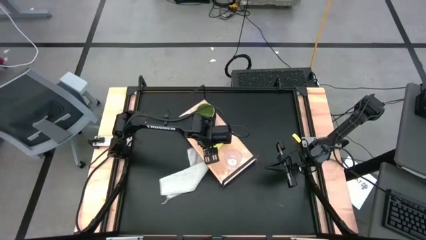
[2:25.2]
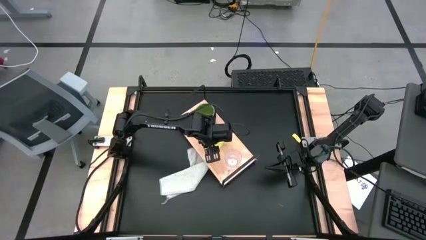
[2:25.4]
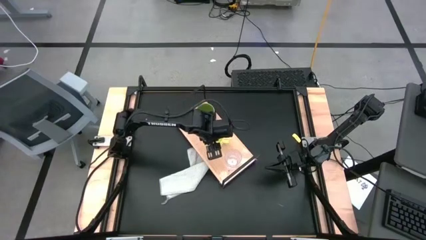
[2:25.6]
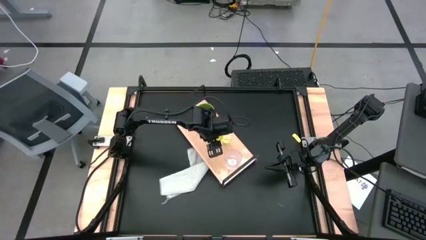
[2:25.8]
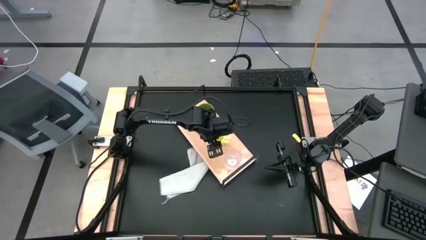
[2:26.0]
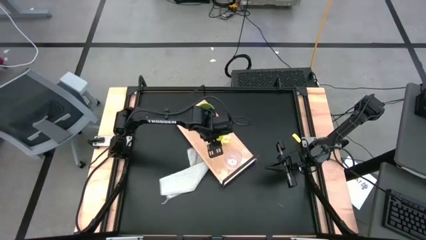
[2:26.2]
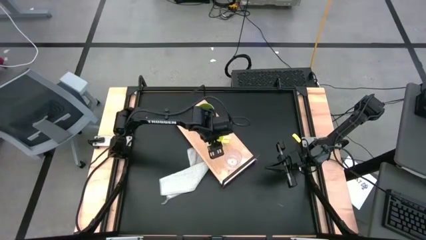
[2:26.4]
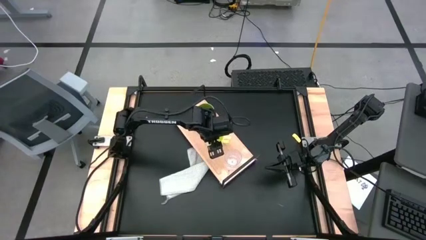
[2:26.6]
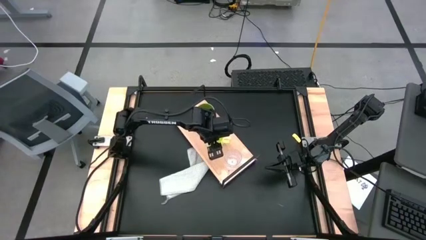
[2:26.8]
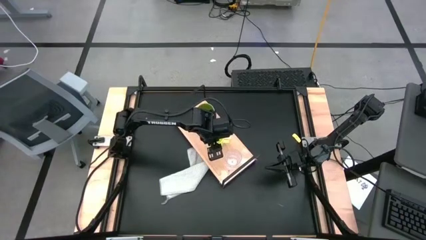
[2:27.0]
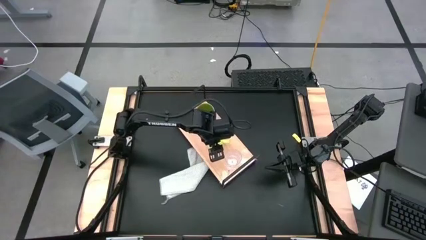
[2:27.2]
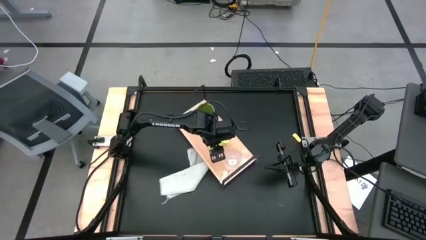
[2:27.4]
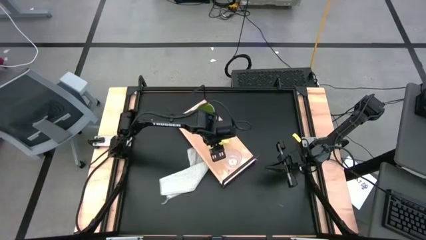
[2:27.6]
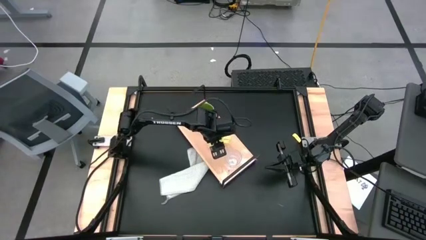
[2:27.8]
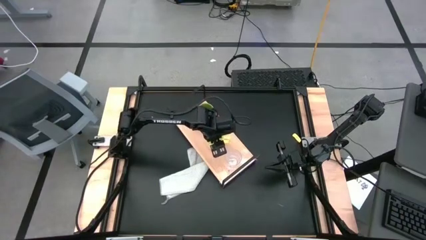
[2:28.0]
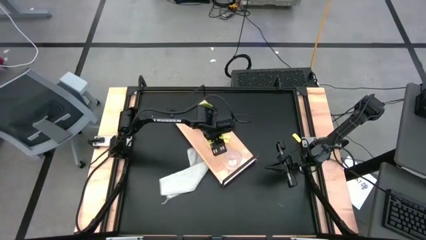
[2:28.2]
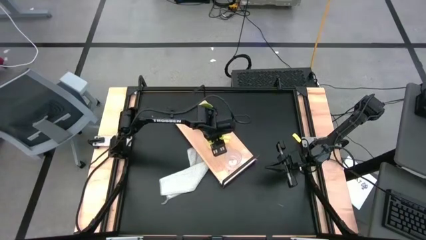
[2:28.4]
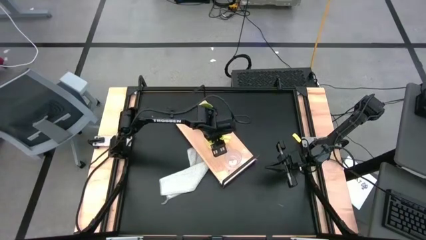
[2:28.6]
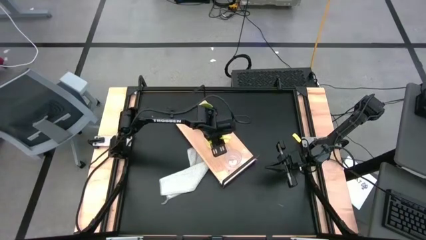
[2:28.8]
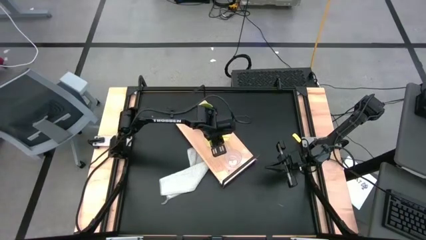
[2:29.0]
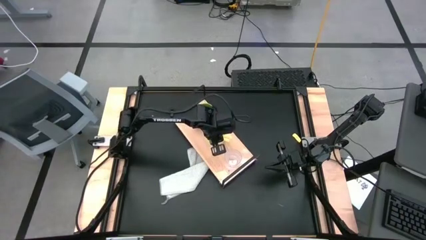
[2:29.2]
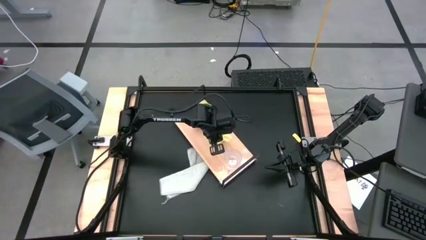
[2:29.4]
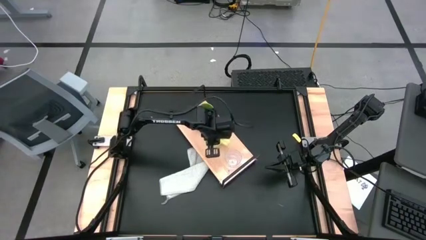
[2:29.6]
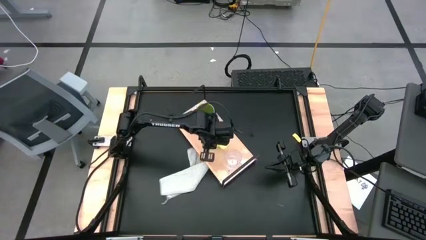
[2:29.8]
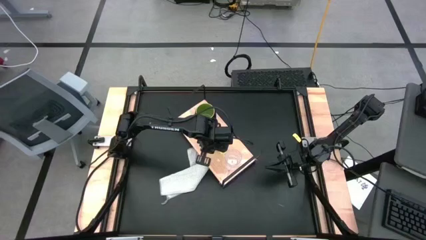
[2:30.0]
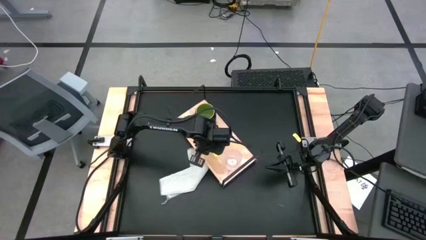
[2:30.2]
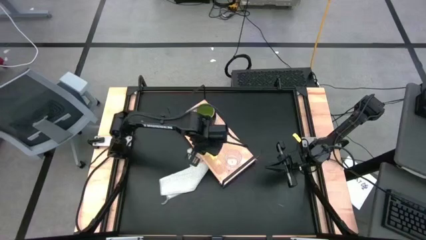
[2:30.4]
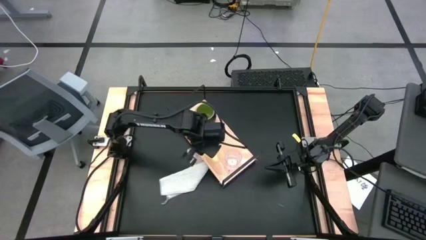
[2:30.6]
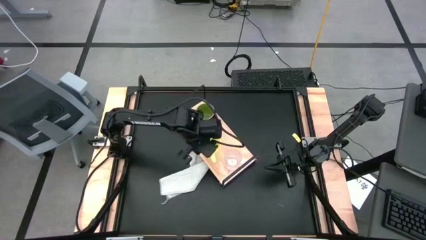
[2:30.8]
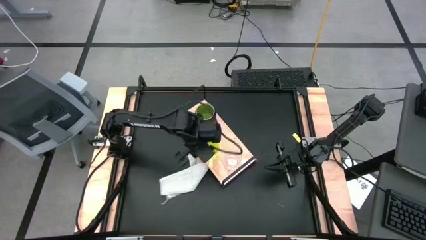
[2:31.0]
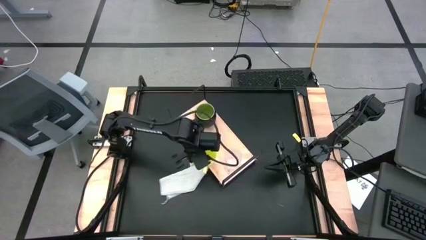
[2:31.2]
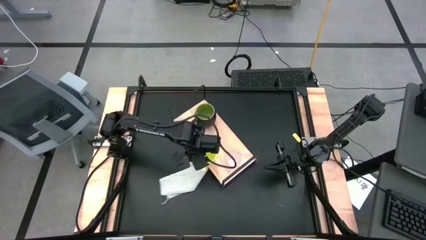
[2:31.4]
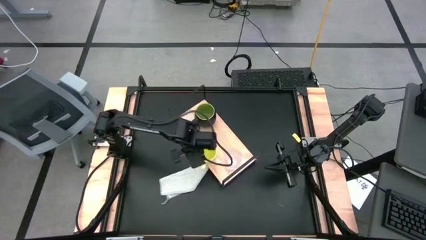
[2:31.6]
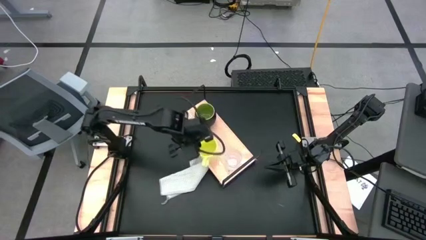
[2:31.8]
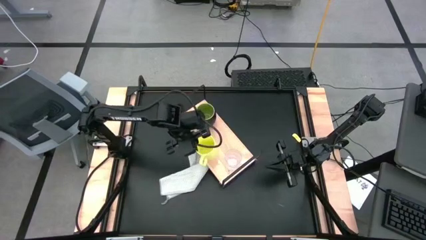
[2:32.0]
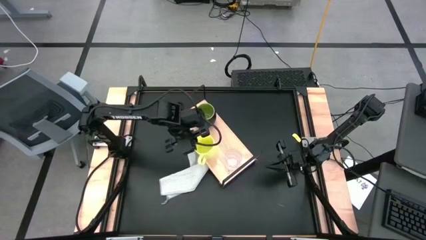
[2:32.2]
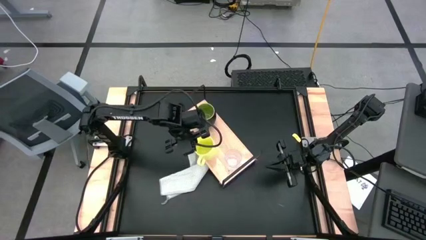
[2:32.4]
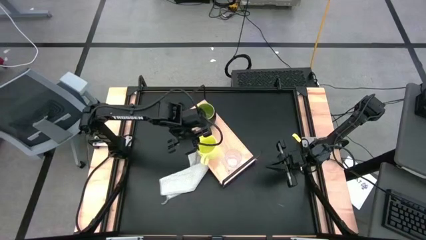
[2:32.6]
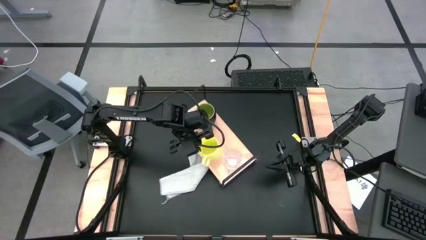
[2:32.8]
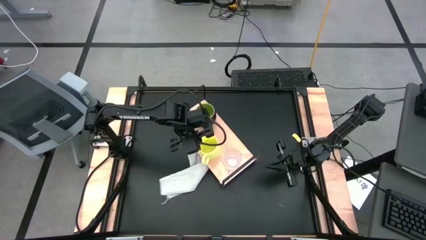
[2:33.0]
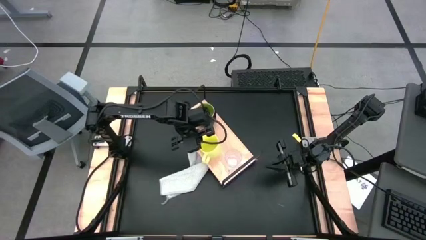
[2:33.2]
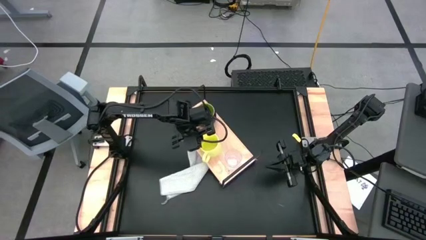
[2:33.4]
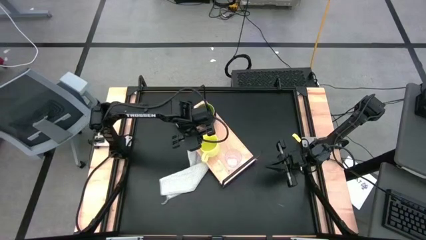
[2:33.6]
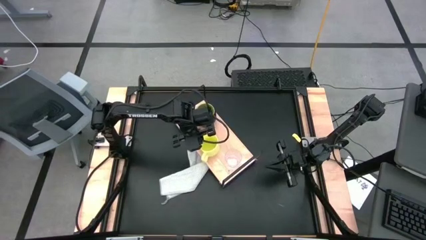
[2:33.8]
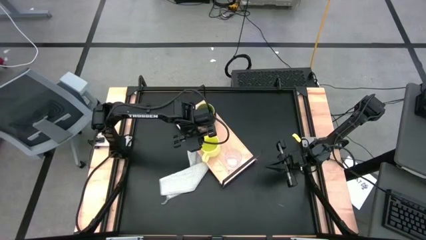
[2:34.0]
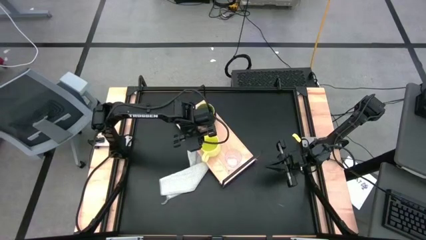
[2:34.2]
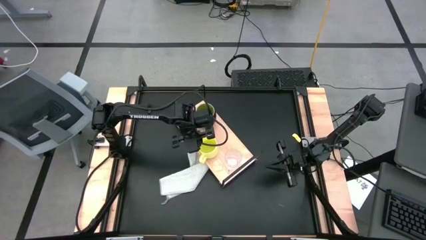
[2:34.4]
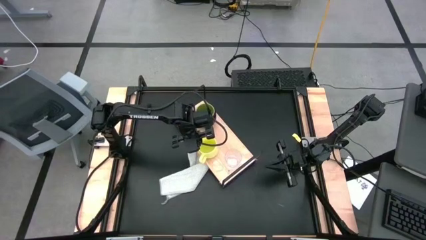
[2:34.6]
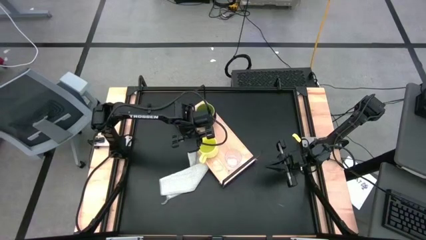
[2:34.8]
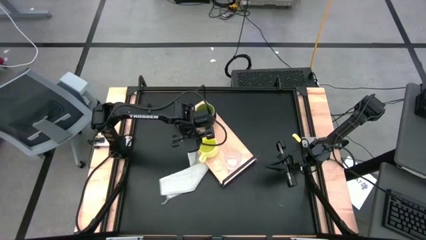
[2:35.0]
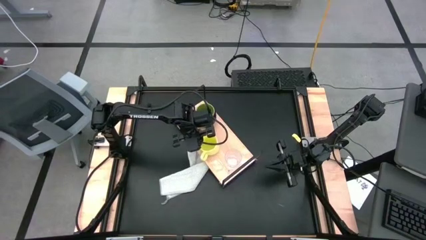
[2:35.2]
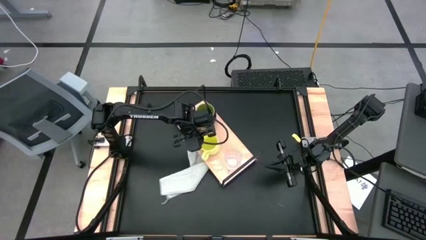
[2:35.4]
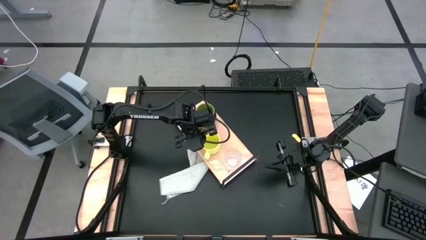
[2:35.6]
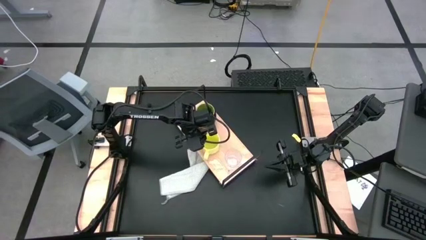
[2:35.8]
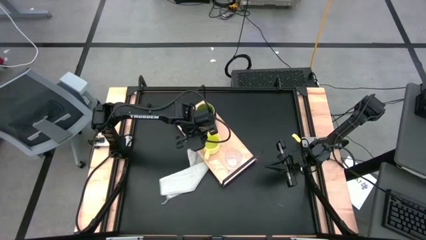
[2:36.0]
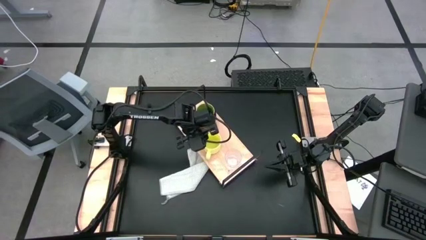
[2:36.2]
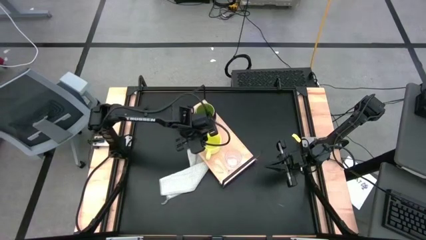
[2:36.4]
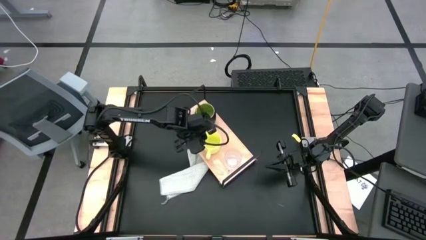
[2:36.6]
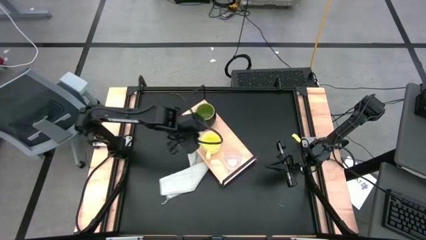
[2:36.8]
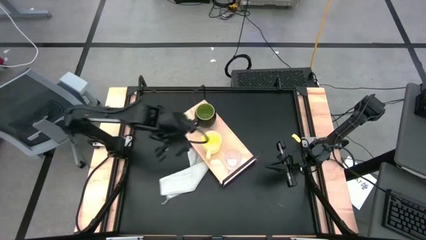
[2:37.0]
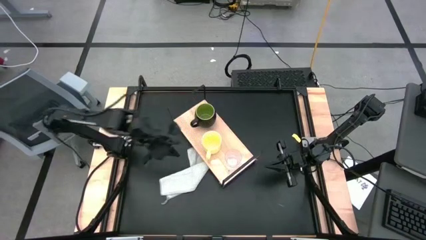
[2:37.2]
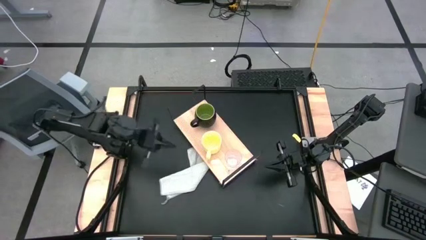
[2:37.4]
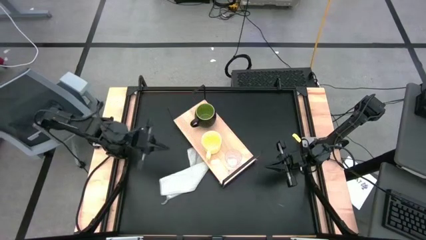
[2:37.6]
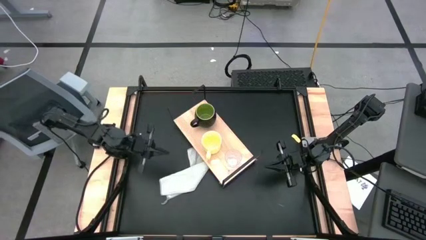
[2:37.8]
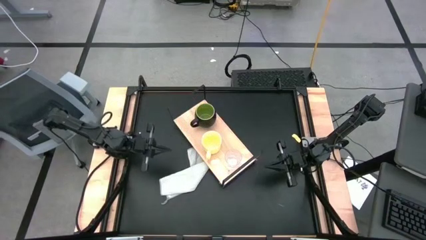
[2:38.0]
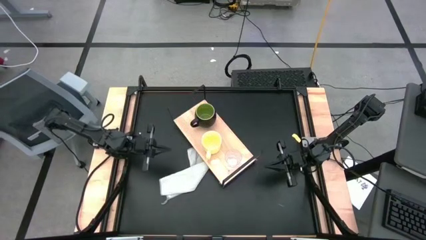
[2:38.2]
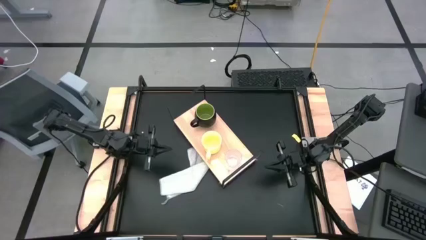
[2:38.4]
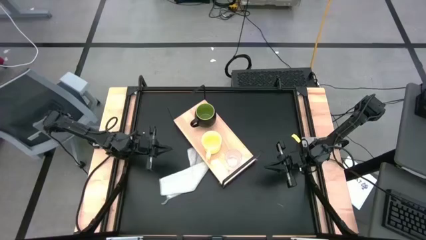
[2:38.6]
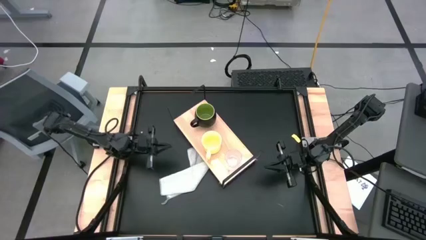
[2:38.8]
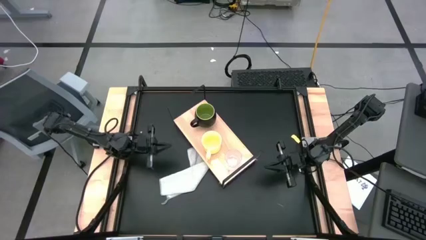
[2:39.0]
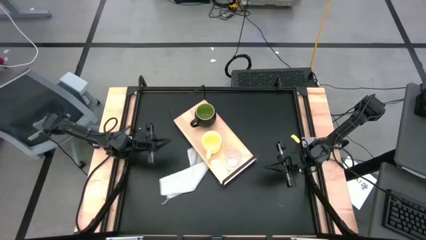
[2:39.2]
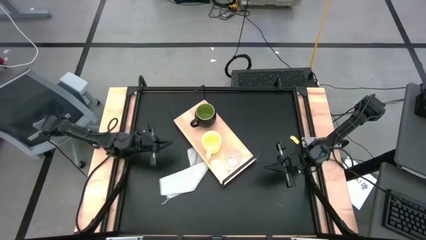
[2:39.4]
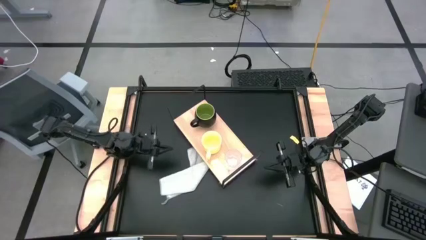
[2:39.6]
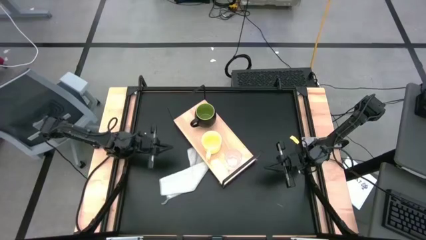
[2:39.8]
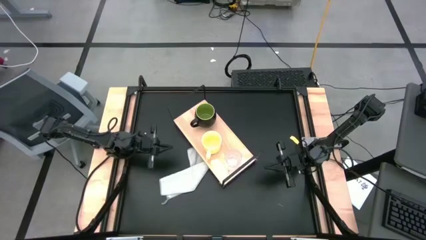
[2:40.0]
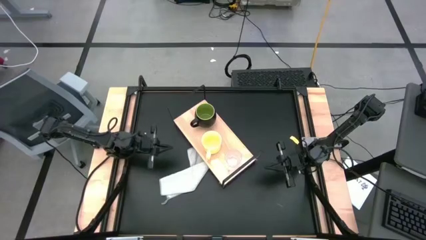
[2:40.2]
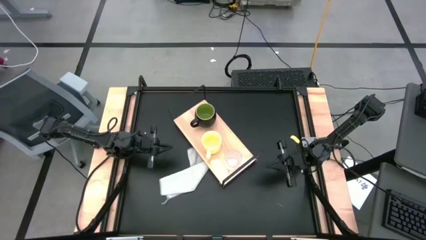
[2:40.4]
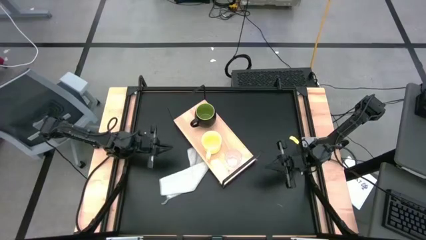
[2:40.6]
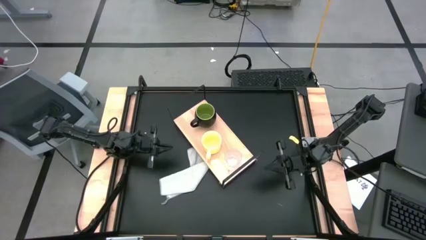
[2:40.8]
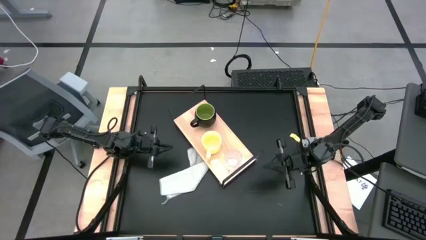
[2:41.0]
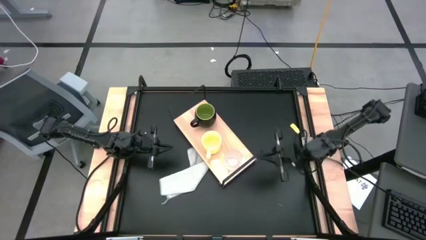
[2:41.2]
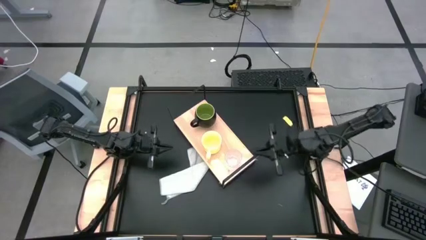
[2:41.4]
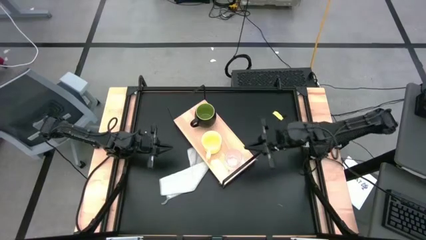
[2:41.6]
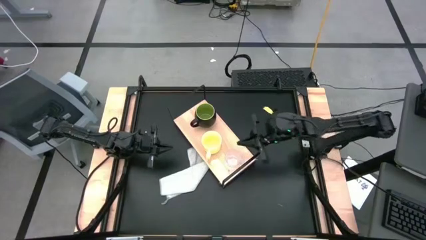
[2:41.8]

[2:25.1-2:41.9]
Task: Stack small to large cups/mugs on shelf
Adjust all the mugs
